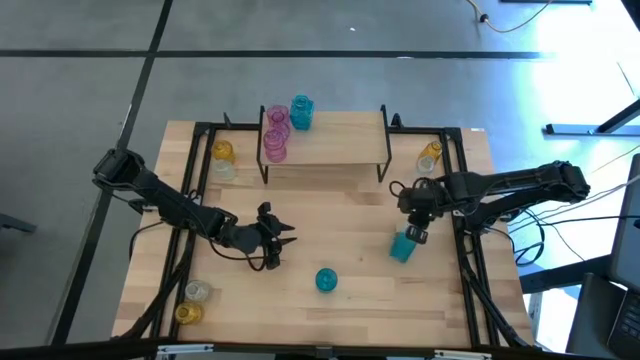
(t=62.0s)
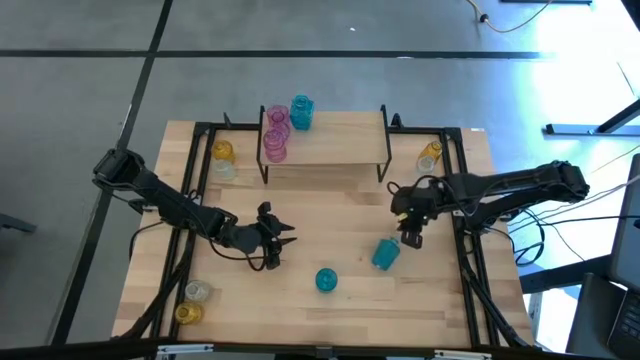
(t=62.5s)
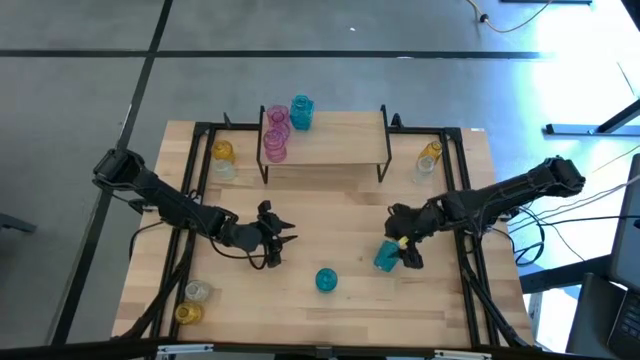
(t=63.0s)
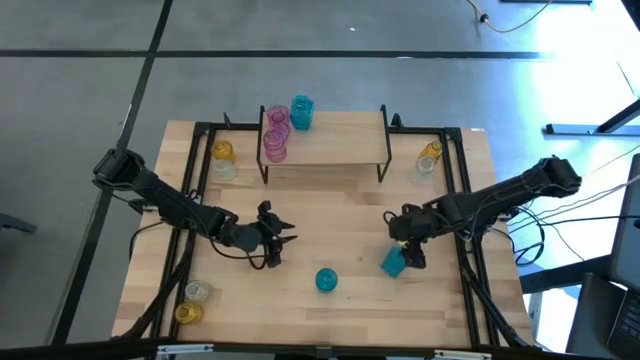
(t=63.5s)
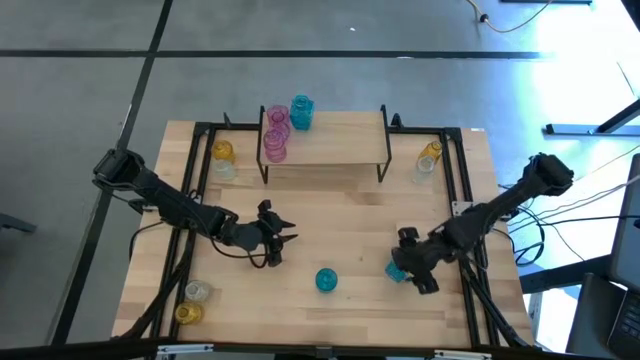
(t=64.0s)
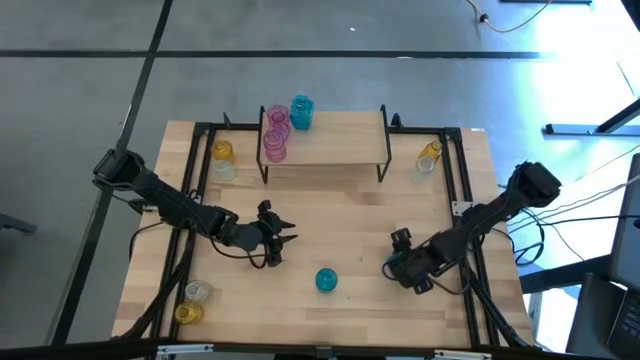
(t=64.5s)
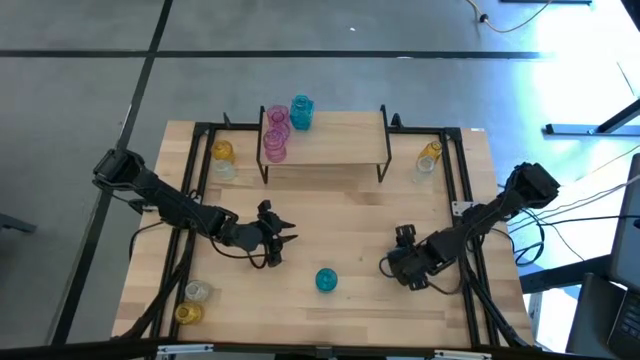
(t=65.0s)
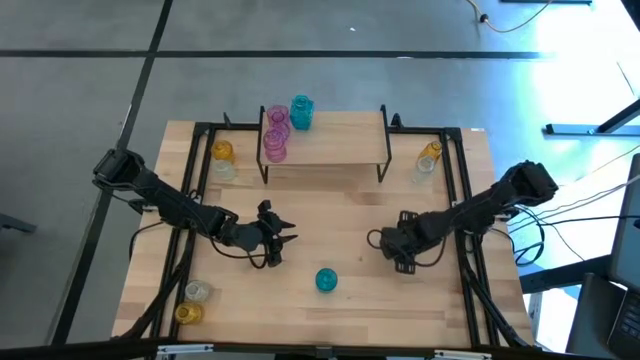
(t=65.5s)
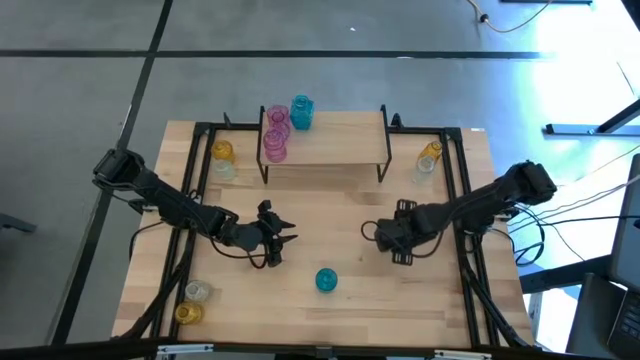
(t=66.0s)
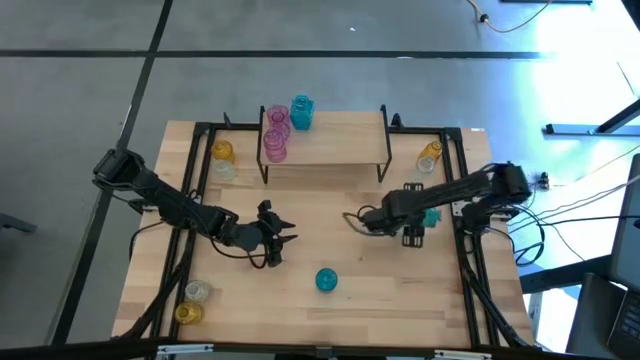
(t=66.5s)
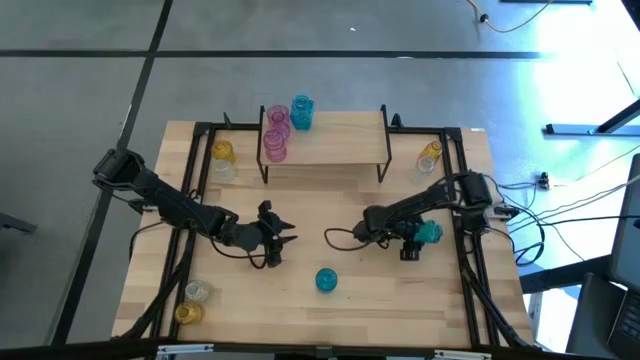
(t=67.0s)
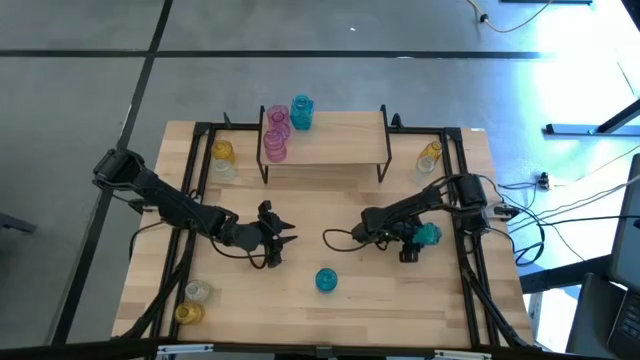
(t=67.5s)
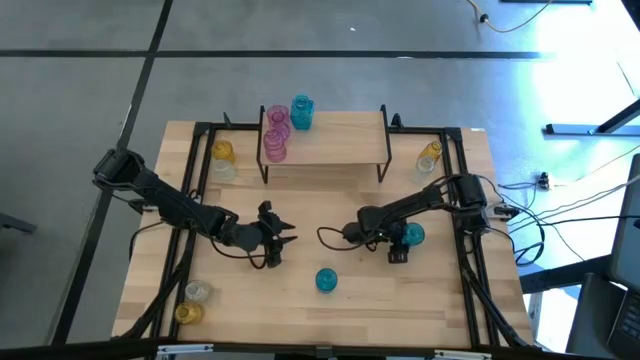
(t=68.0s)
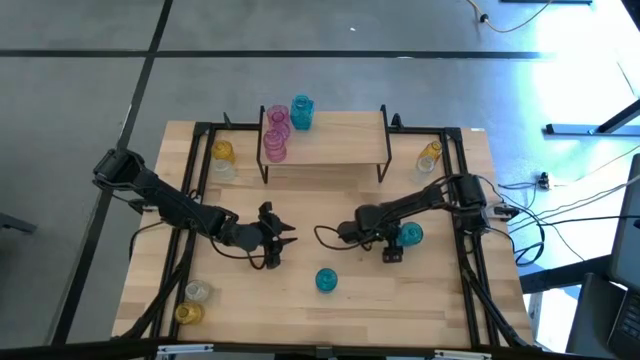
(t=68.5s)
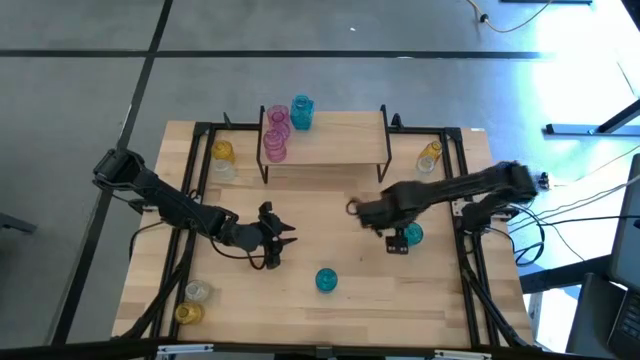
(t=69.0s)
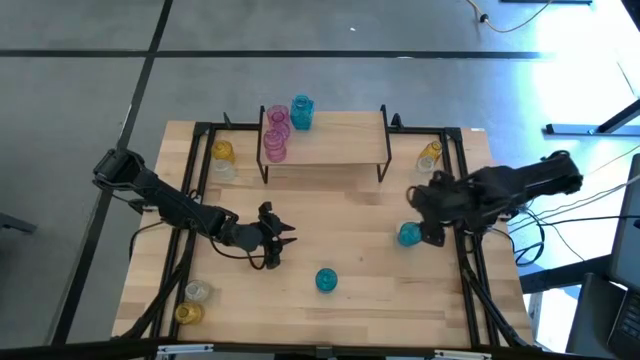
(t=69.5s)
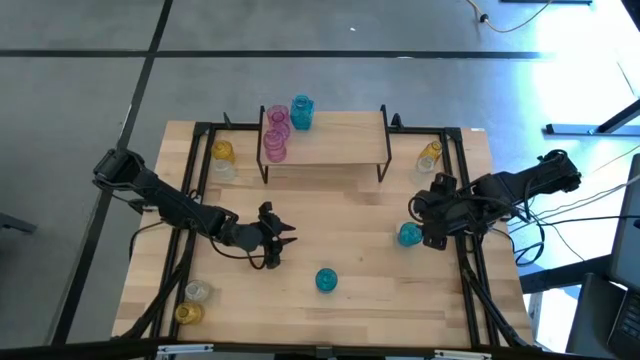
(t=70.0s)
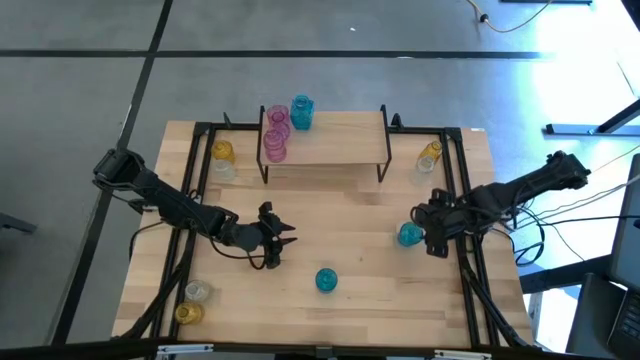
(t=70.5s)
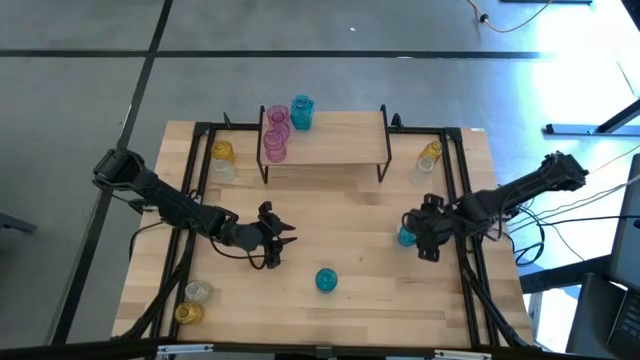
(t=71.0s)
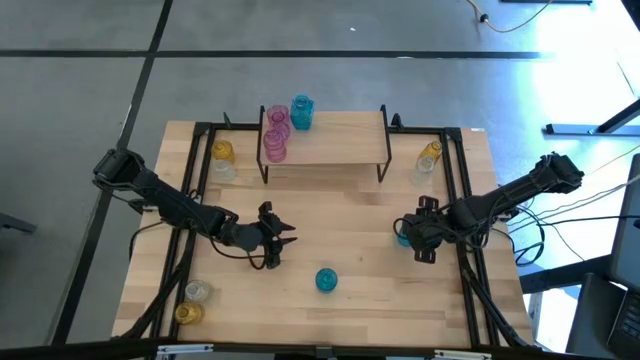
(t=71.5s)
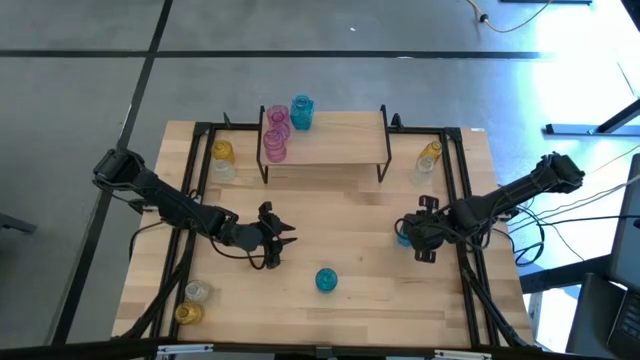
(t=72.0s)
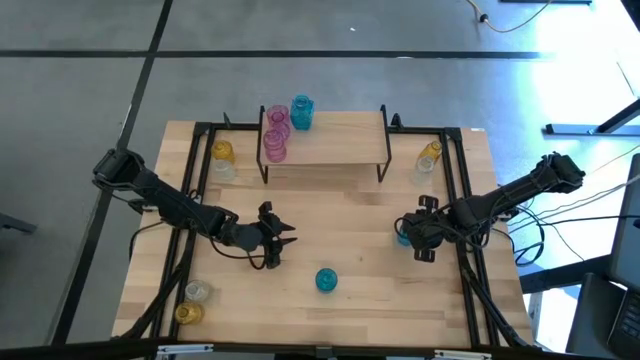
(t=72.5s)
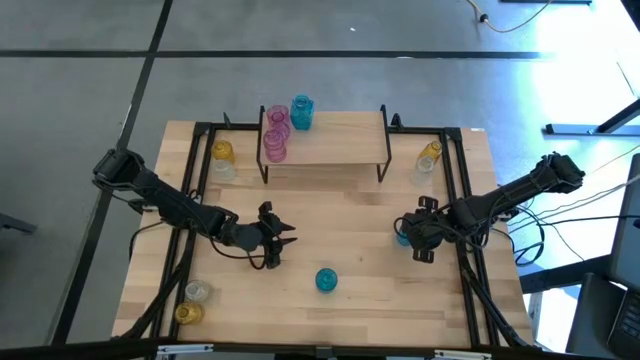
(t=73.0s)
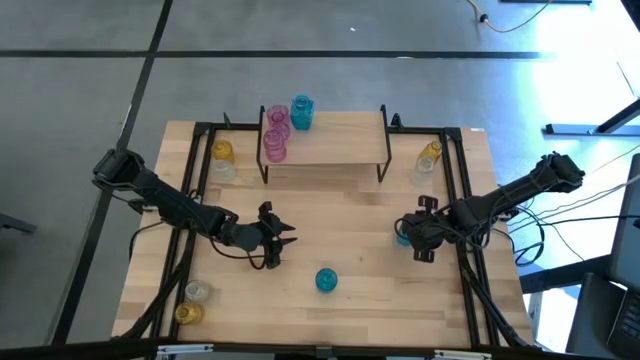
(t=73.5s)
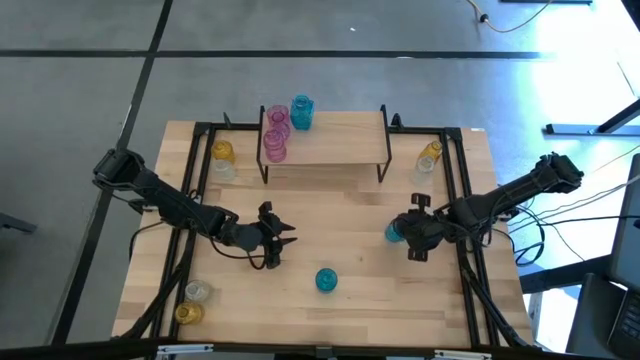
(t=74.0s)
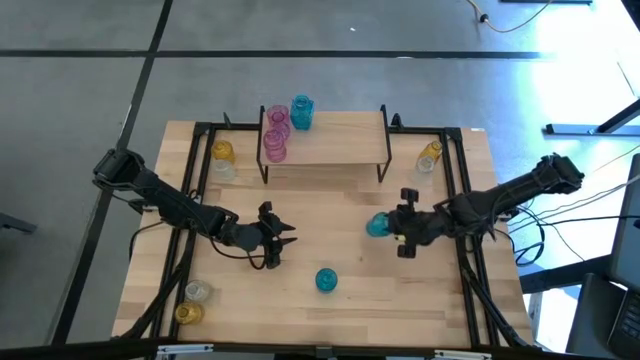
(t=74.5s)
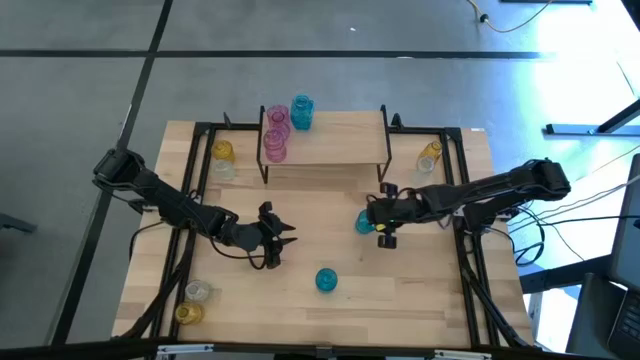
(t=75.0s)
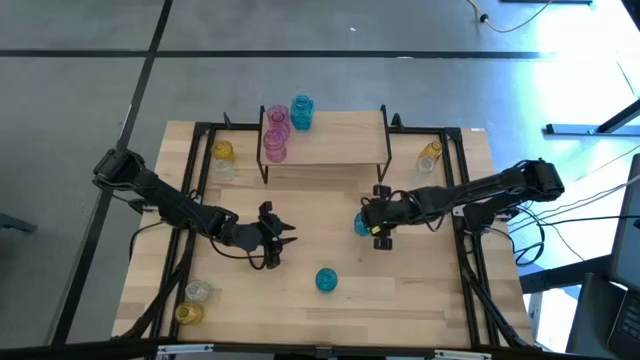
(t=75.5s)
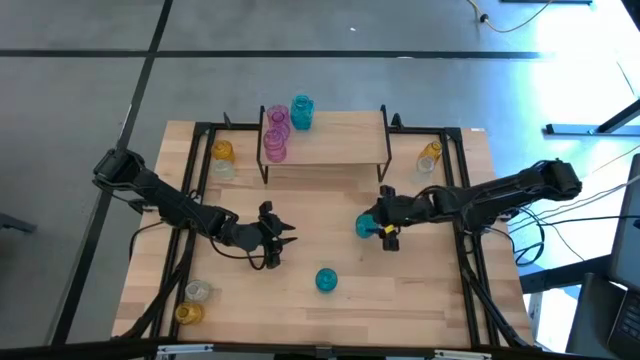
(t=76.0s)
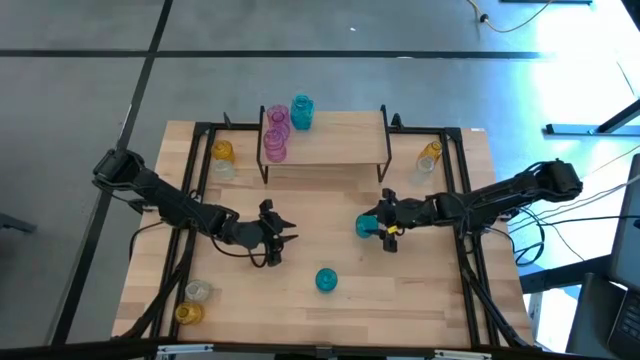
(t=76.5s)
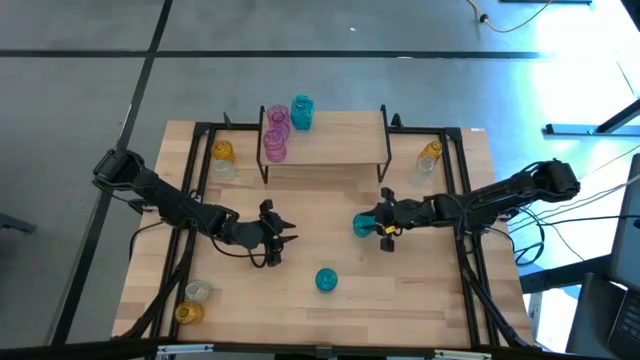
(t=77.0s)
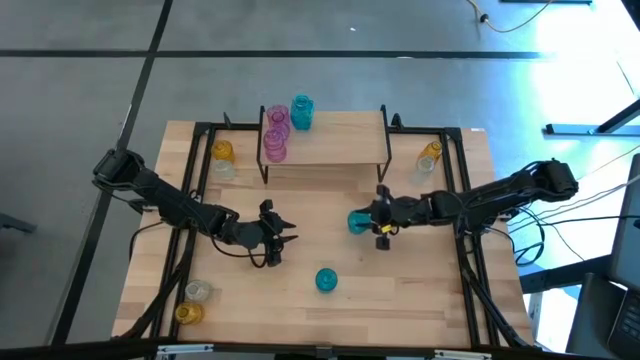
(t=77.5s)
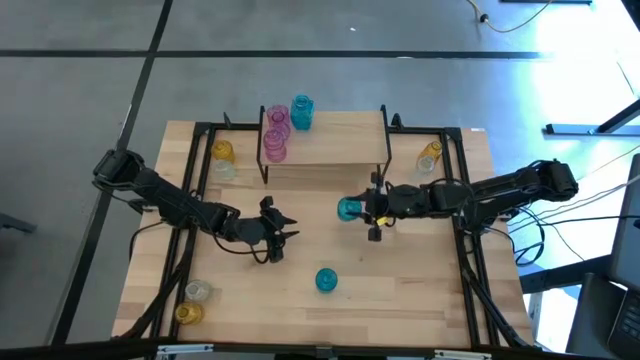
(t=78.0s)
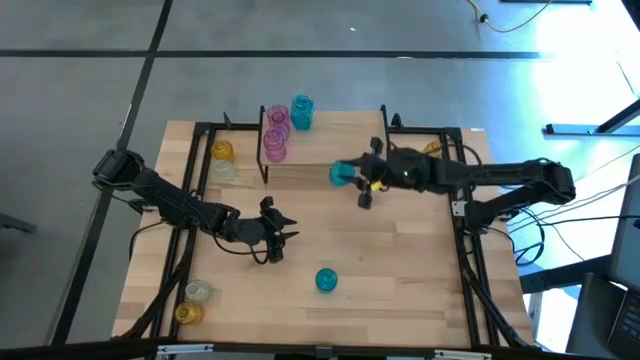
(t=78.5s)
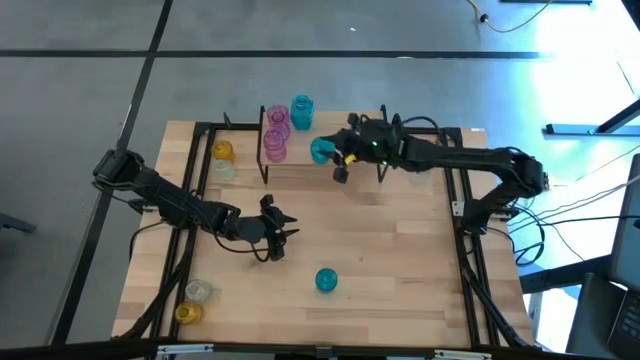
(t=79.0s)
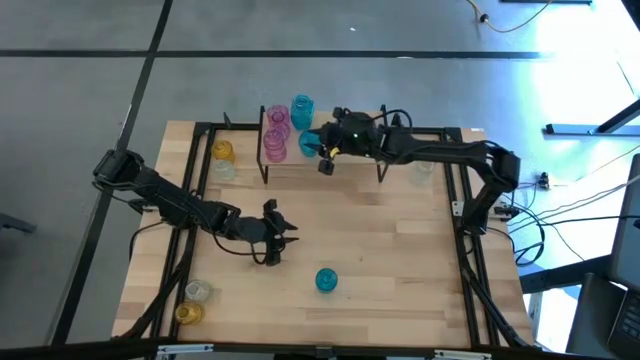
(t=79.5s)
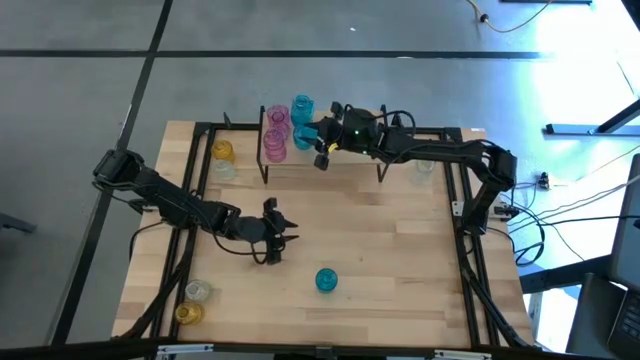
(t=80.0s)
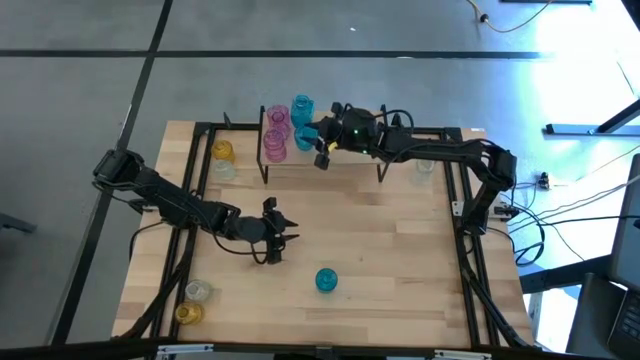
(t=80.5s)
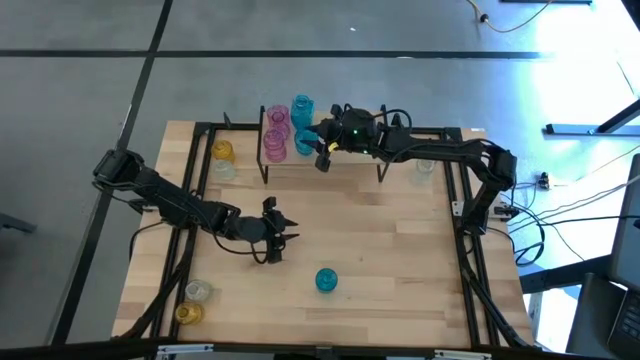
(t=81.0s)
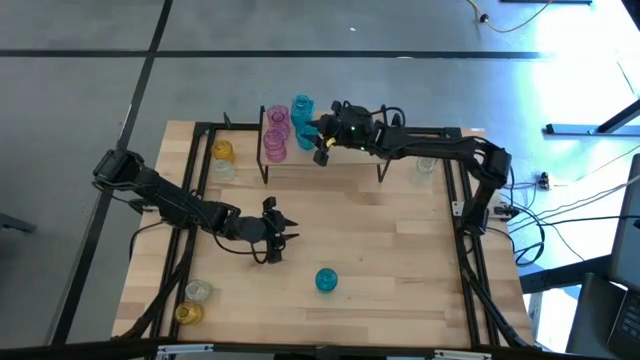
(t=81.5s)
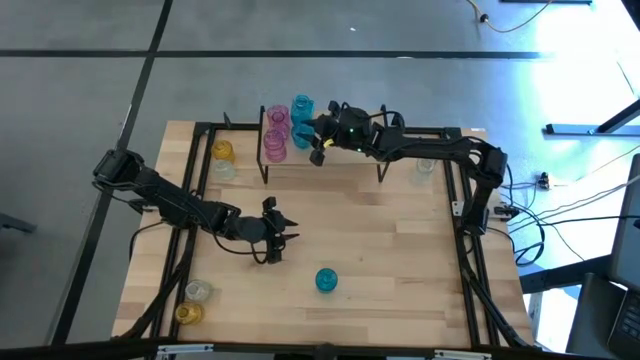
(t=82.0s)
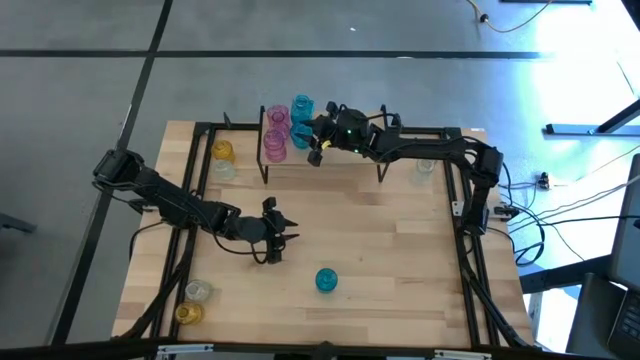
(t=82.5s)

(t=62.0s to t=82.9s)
Task: sort vases onto shelf
Put the right blue flower vase on the shelf aligned with the other blue flower vase
